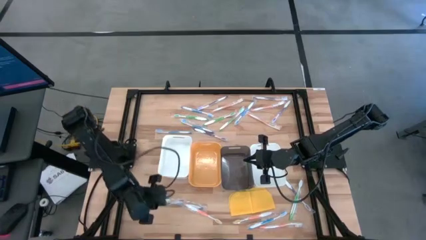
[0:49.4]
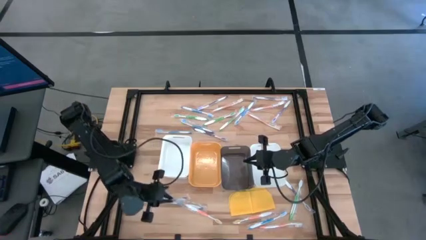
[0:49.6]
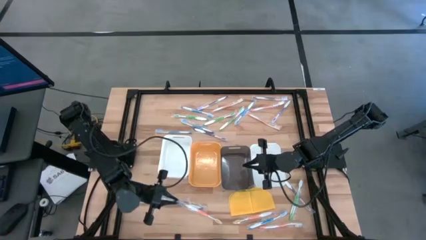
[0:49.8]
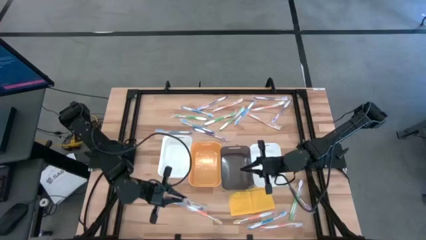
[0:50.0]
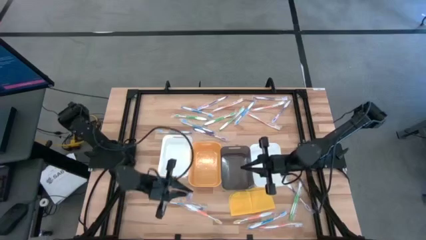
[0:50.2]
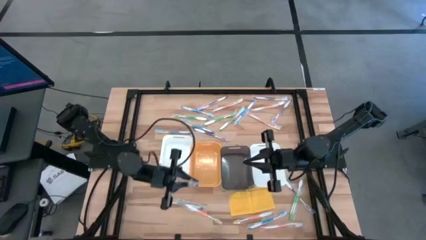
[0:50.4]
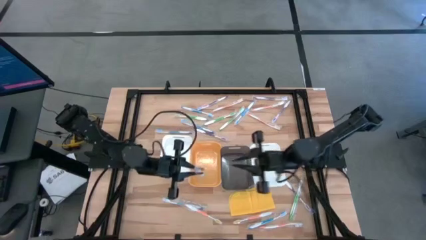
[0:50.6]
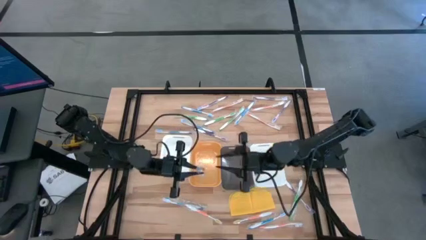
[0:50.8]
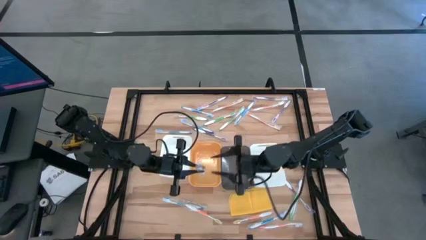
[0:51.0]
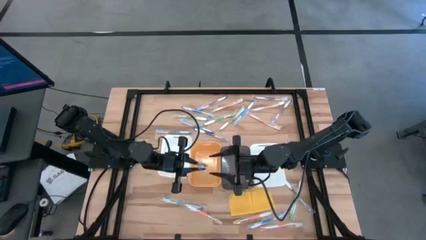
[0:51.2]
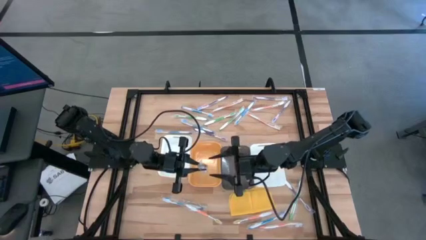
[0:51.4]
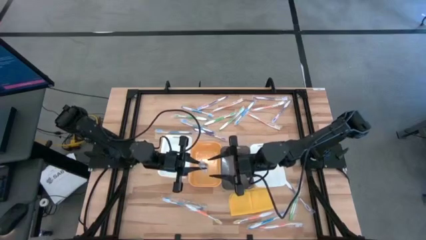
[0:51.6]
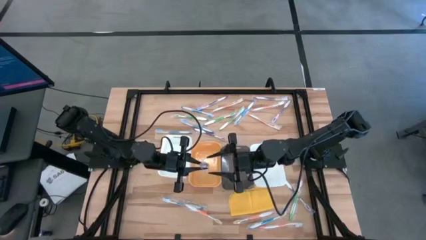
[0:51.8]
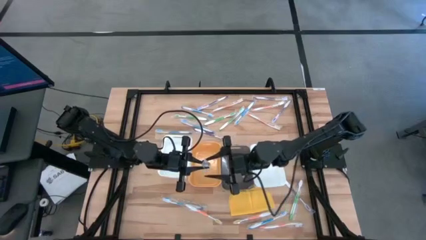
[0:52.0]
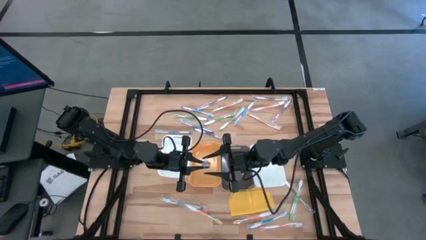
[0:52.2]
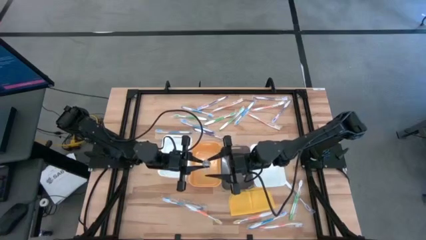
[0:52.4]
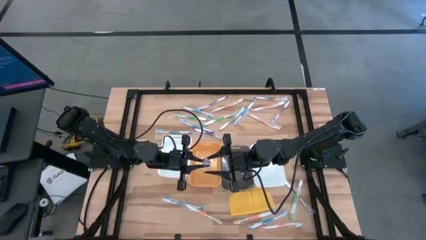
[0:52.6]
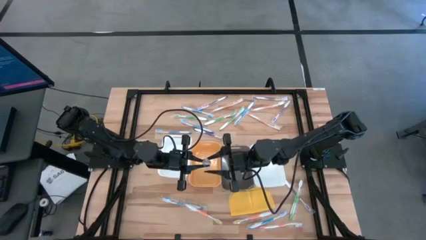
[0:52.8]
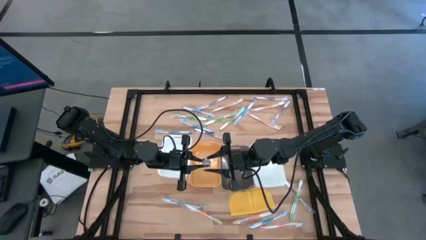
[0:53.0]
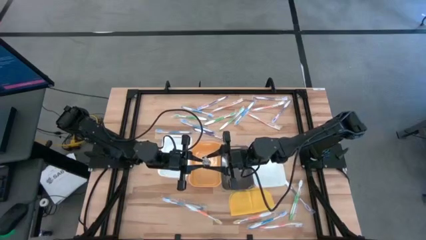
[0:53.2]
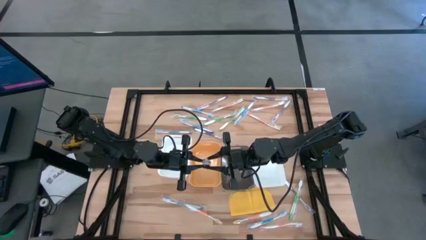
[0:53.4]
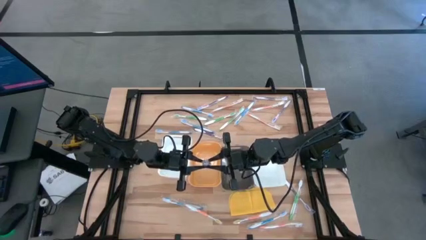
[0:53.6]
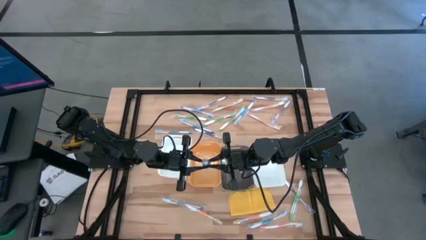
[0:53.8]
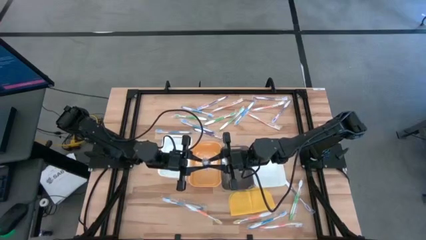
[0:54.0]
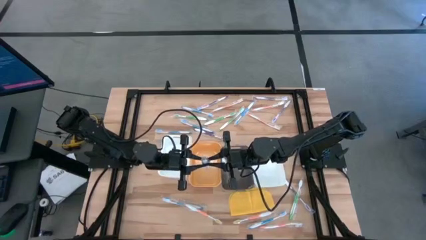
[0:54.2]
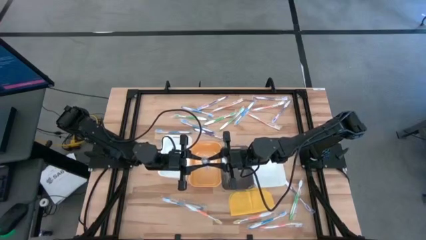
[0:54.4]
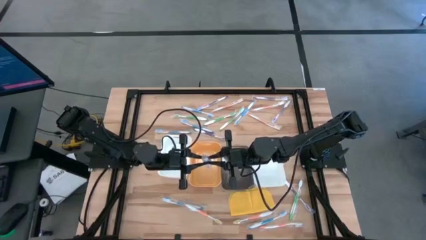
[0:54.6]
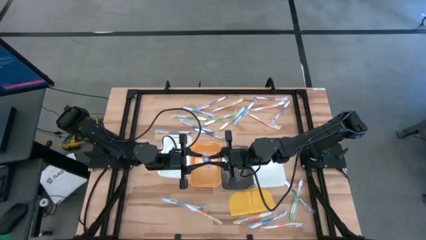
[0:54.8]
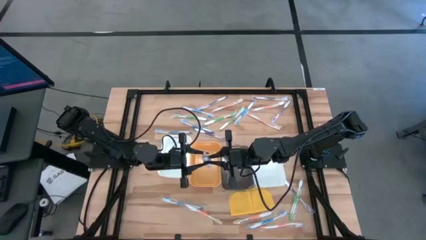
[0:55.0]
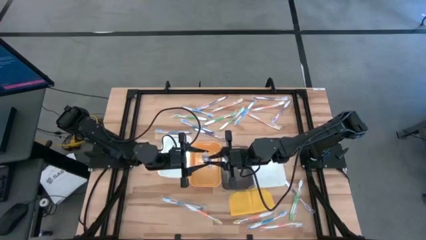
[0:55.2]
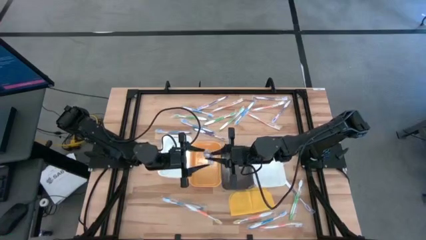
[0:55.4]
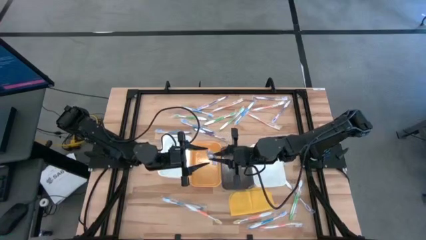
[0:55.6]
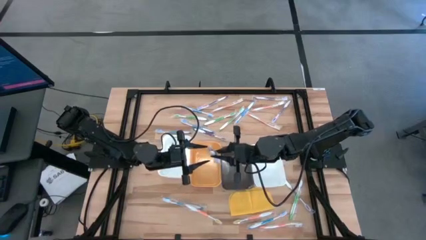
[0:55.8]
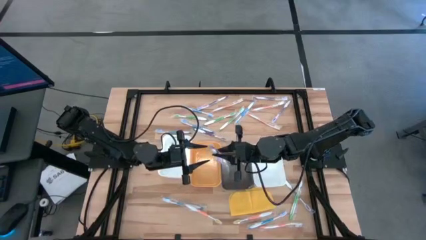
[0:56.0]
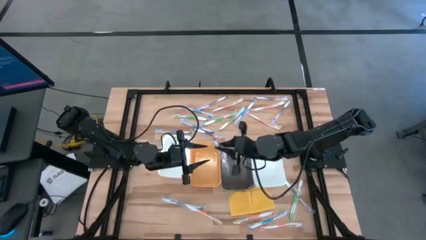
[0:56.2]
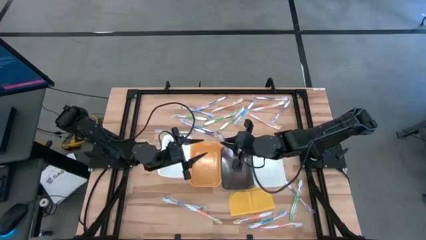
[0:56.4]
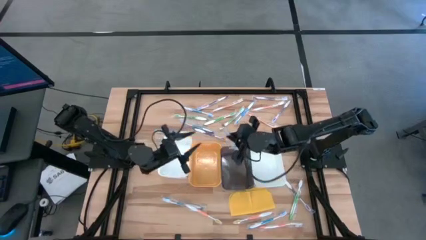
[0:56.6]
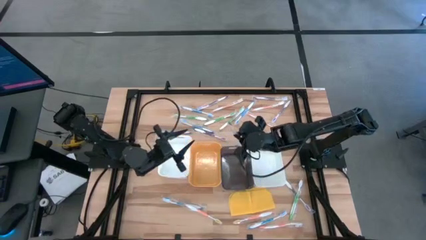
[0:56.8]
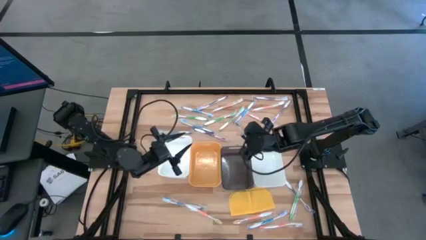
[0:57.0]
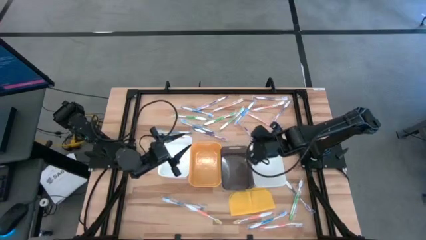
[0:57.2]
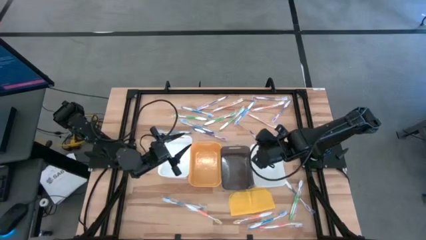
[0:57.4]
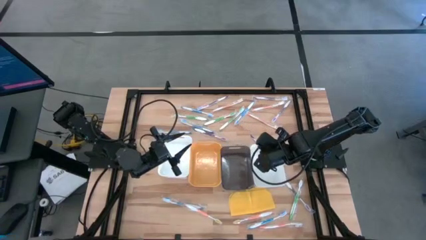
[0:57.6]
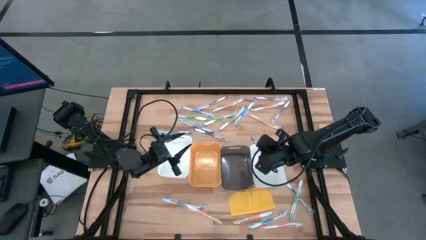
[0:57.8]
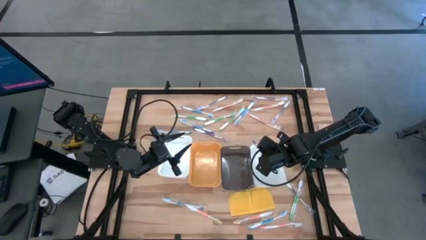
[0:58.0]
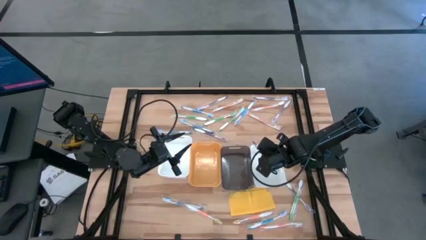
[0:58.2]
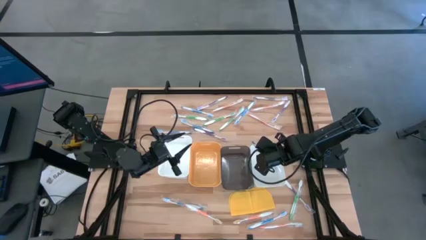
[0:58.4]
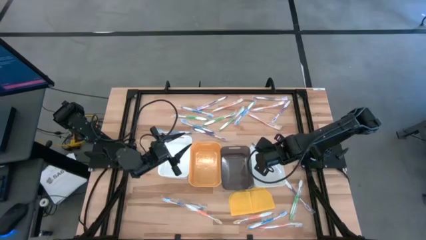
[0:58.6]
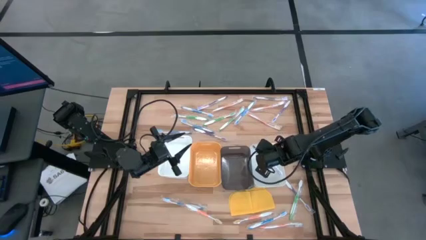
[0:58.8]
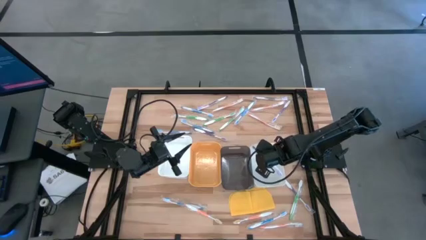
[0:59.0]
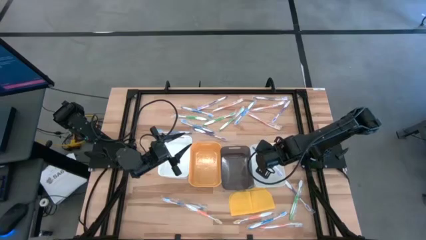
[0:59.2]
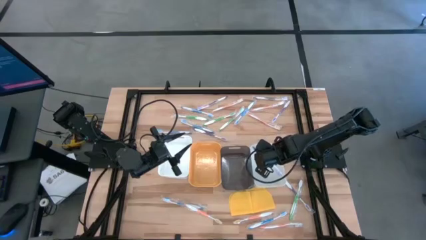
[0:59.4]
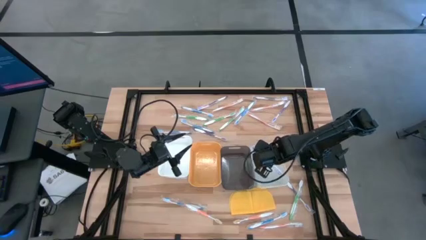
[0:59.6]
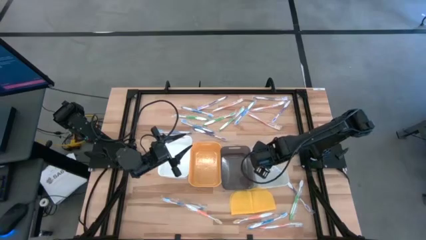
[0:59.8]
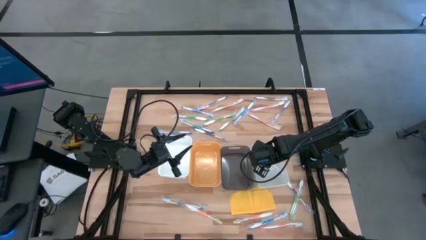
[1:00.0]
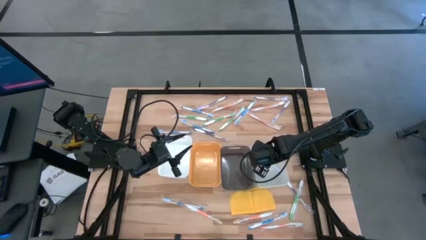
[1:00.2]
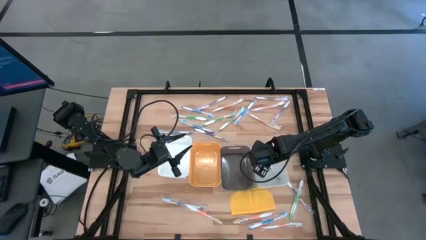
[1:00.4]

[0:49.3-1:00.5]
Task: Pick & Place Toothbrushes
Put the purple toothbrush into the right white bin

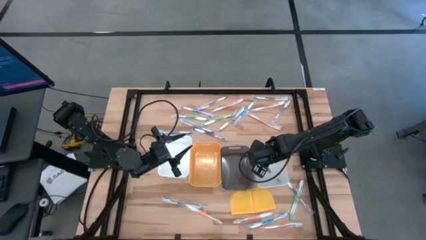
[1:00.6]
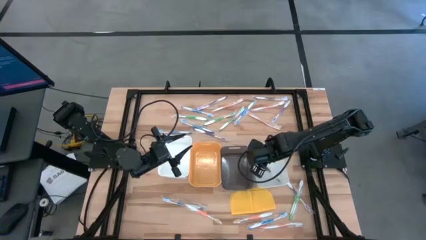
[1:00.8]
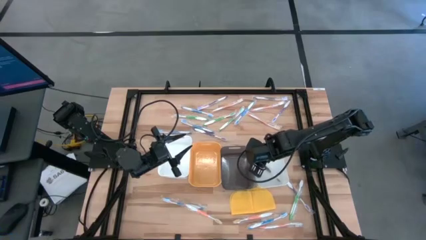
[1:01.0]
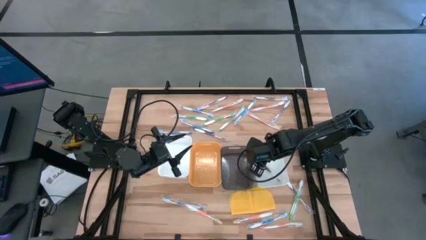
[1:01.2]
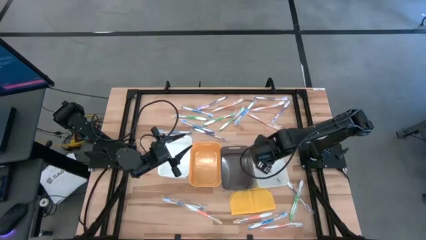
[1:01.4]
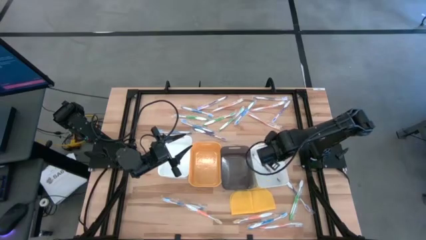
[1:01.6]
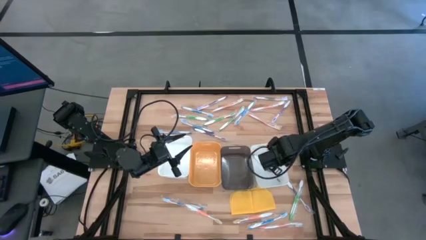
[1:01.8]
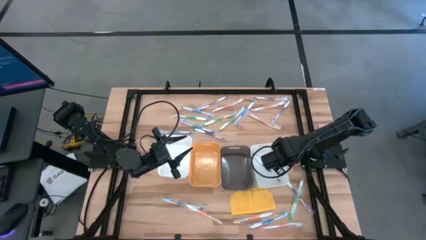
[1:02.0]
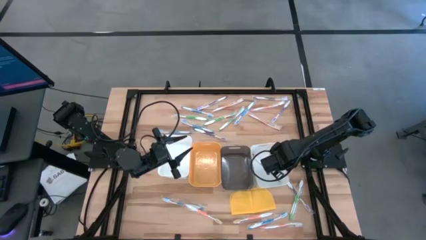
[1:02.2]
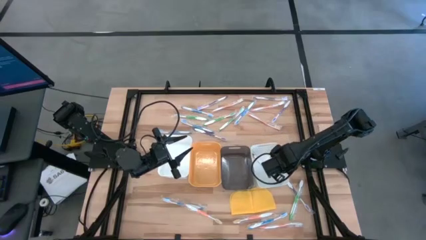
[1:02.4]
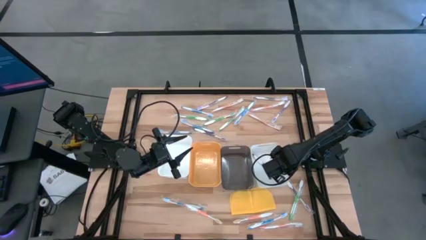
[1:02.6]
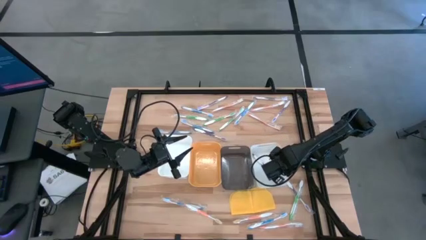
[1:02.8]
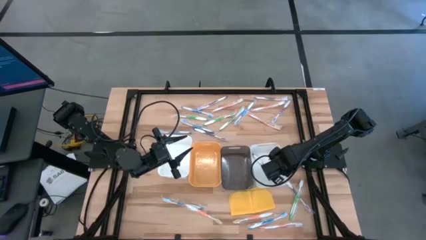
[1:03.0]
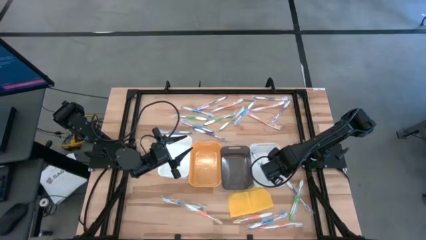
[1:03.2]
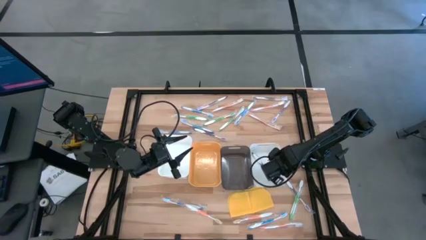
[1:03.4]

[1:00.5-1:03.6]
Adjust the right white bin
